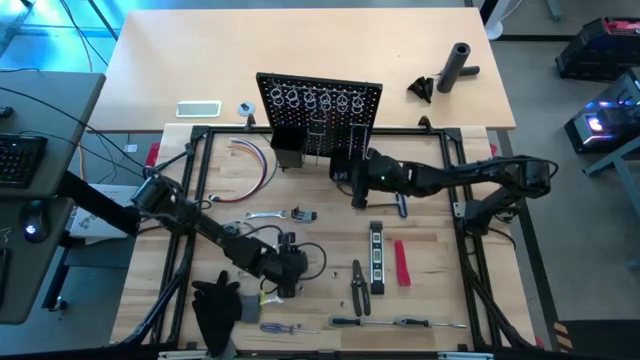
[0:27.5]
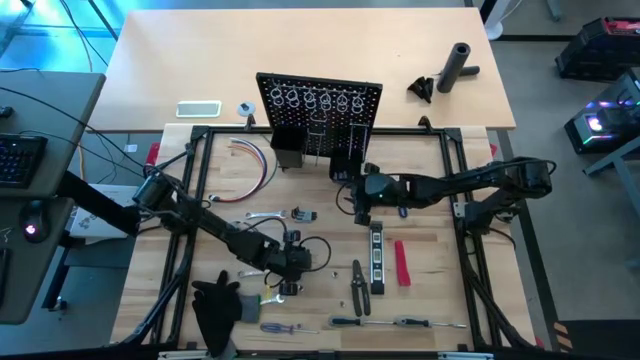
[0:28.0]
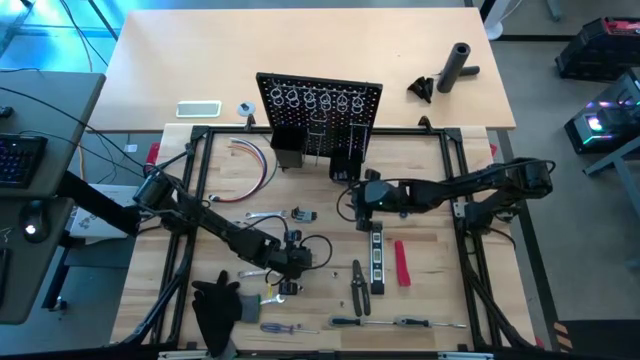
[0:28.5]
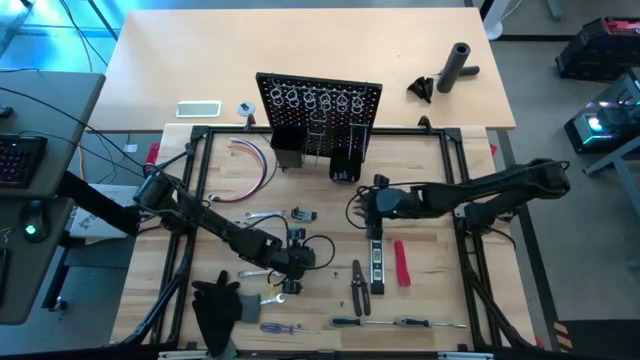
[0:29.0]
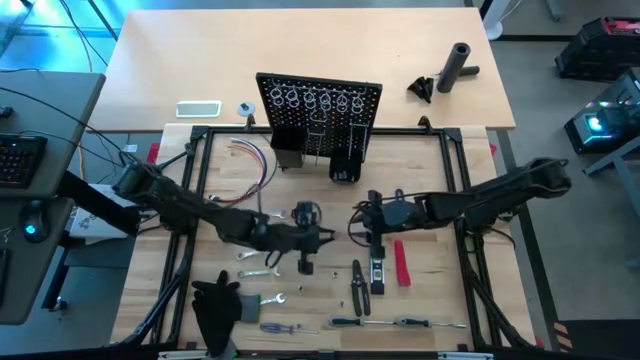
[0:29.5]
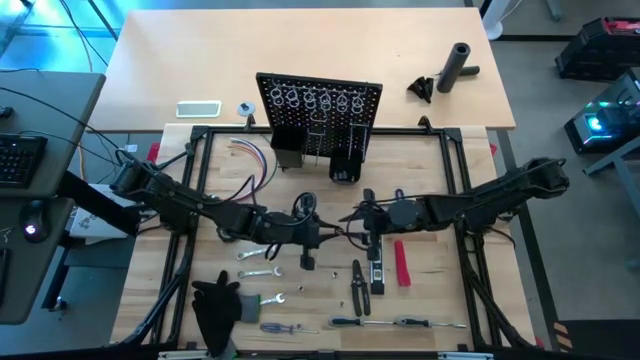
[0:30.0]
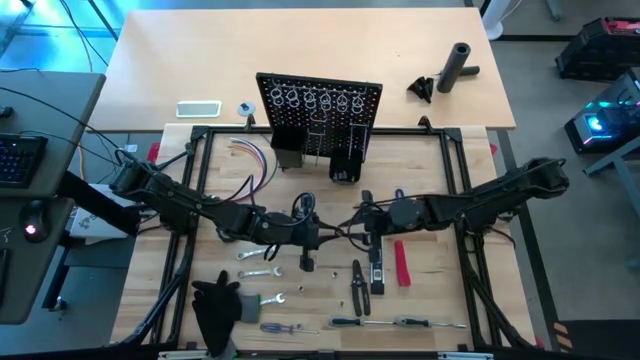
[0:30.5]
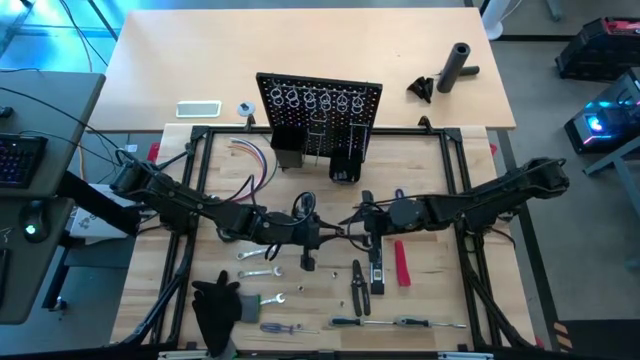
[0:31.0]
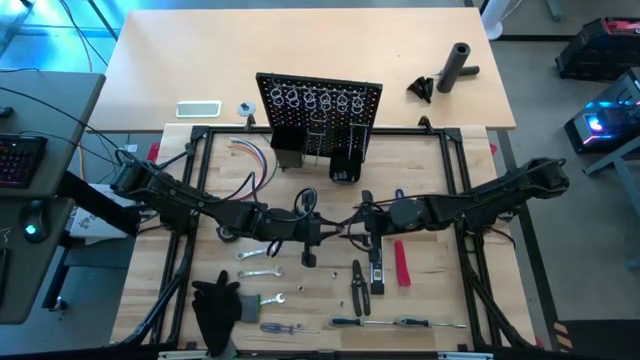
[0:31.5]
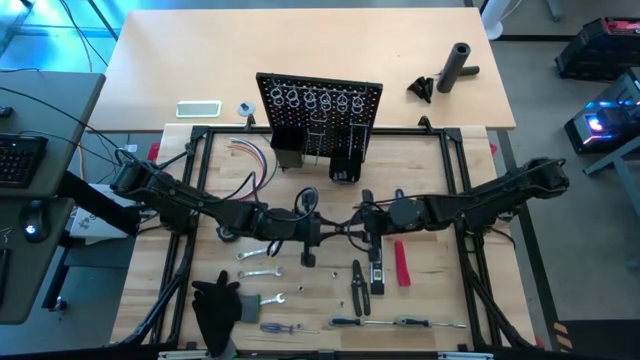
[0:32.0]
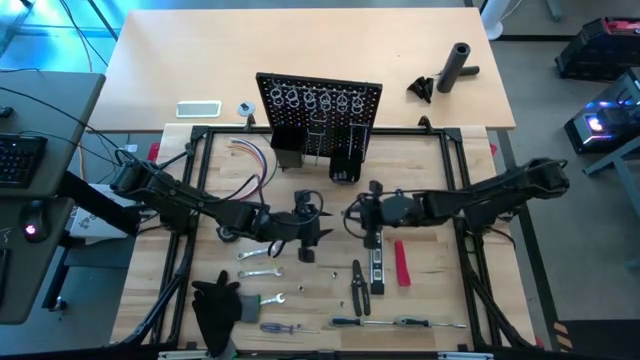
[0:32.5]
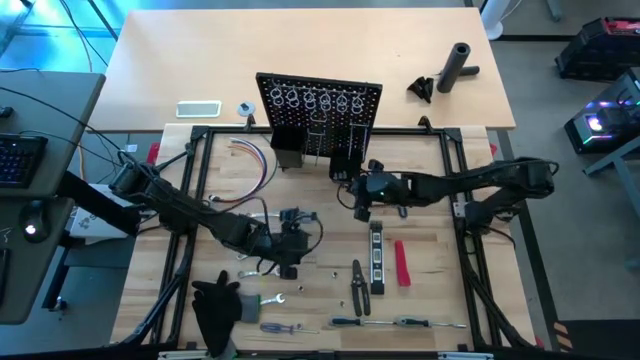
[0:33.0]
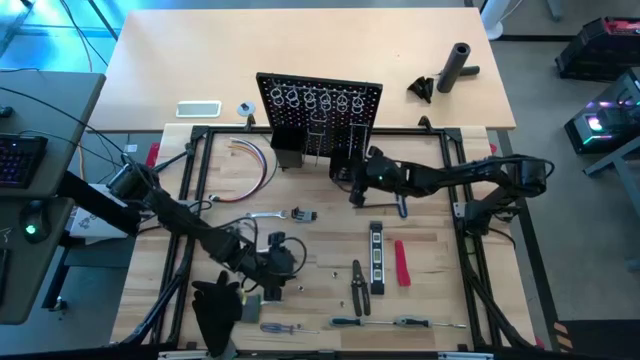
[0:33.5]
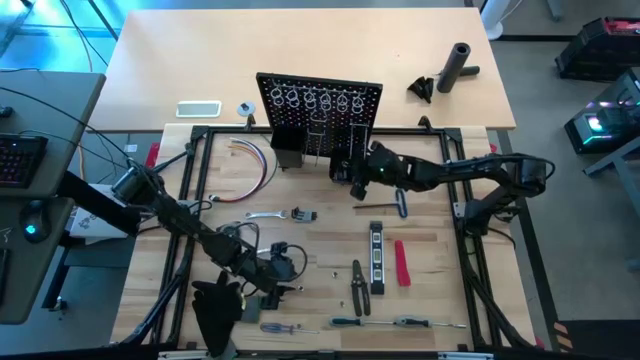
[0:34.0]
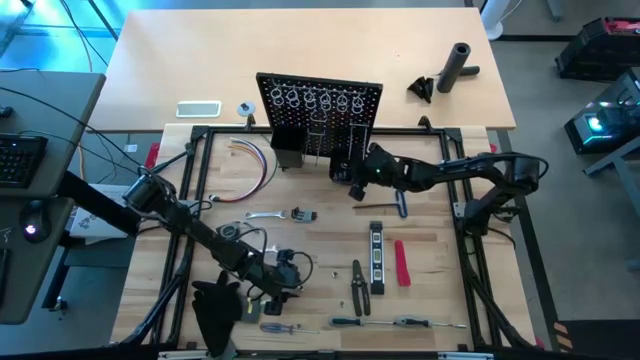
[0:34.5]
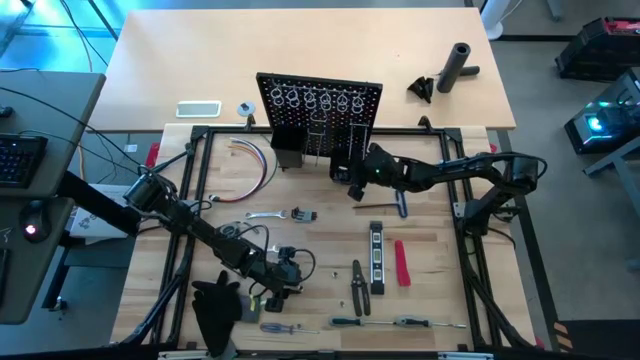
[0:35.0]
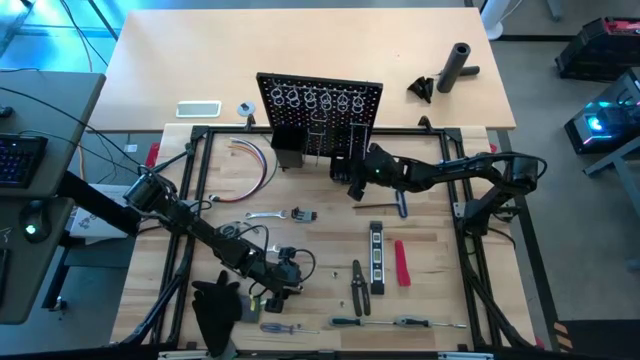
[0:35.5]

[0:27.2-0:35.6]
Task: Hang tools onto peg board
Put the socket into the small black bin on the black pegboard

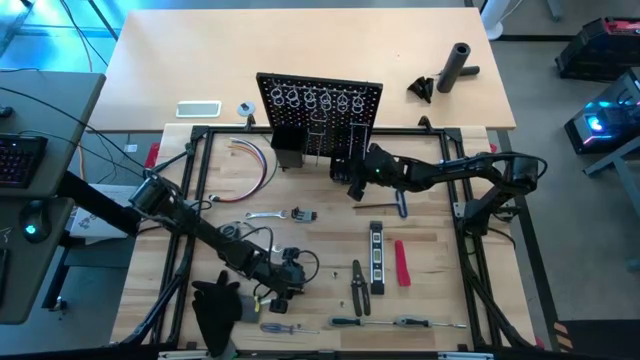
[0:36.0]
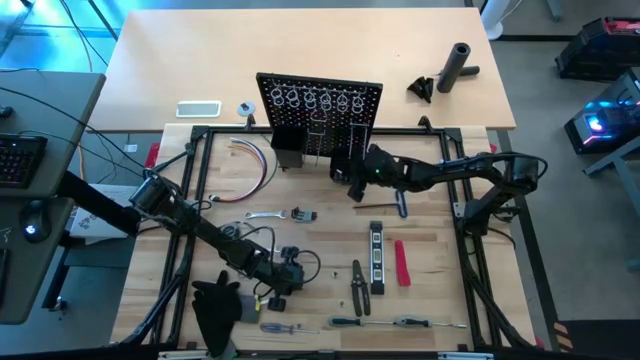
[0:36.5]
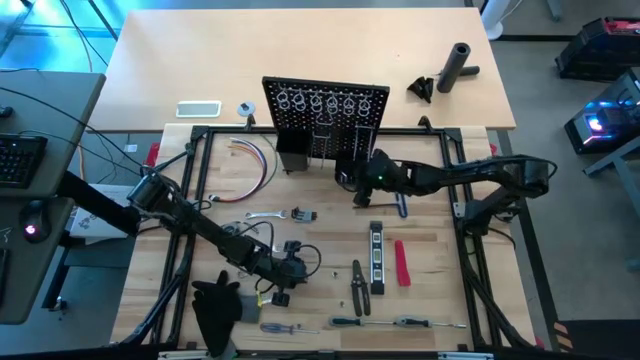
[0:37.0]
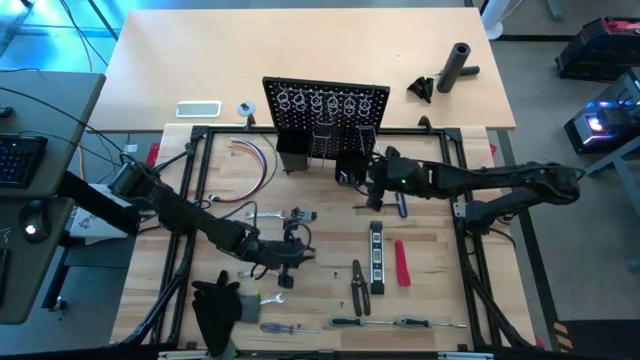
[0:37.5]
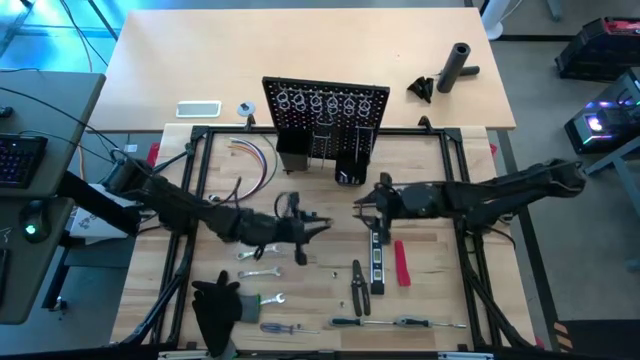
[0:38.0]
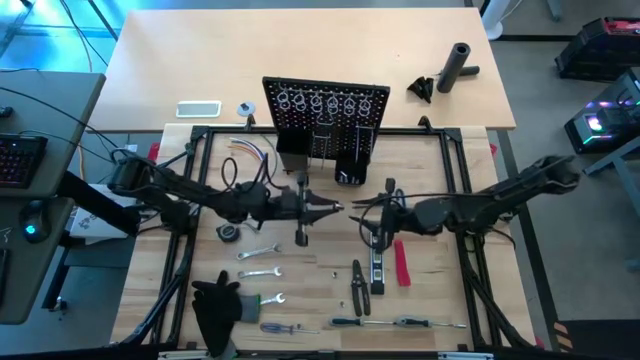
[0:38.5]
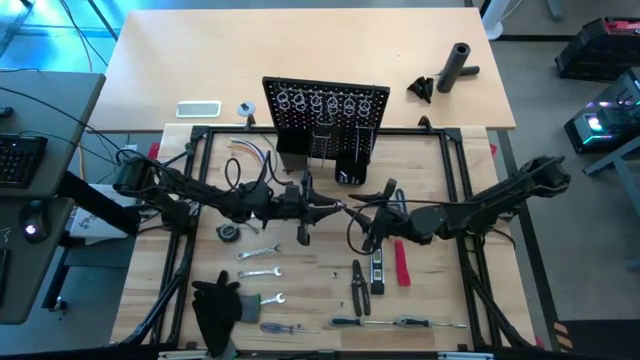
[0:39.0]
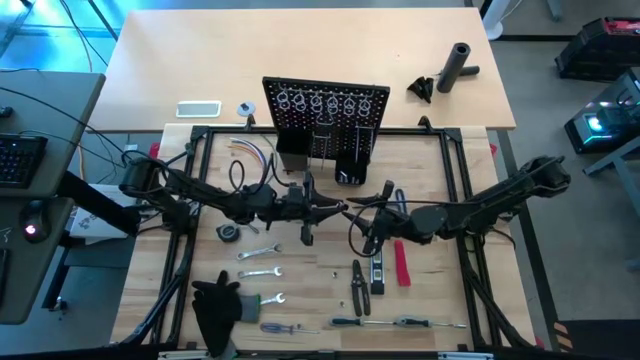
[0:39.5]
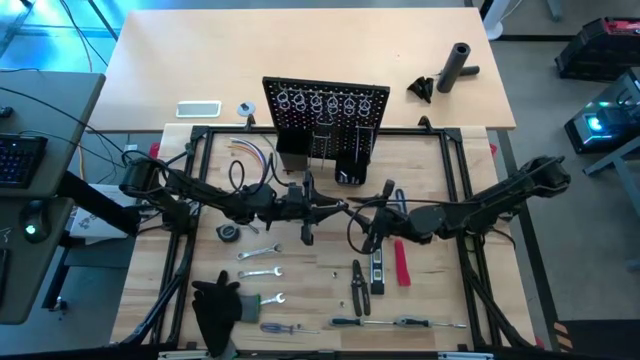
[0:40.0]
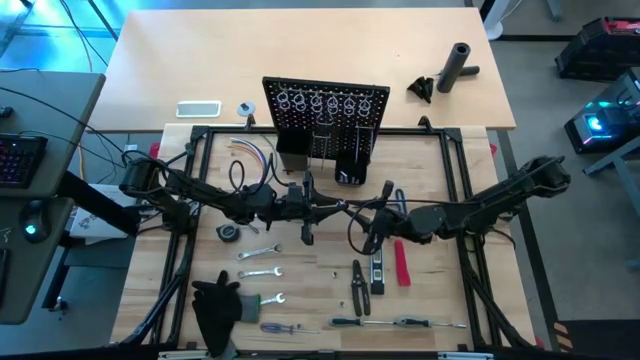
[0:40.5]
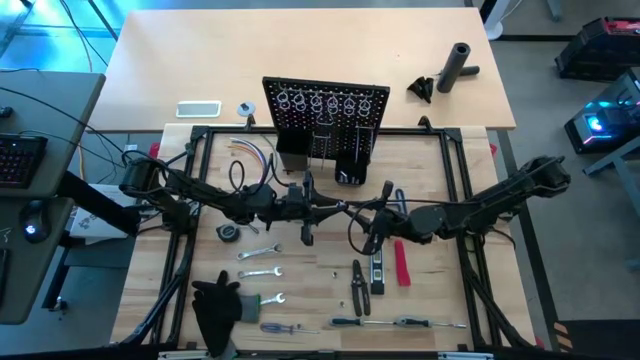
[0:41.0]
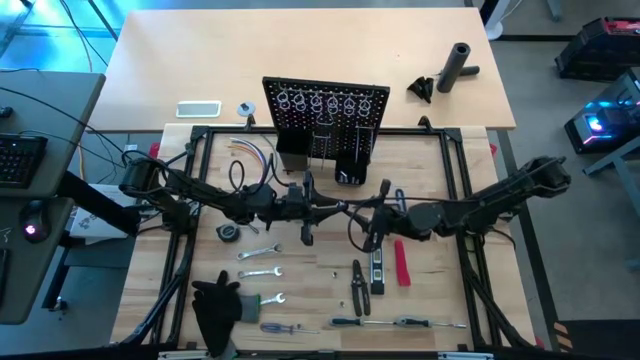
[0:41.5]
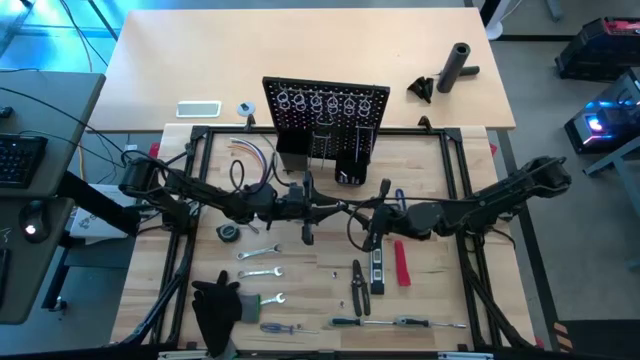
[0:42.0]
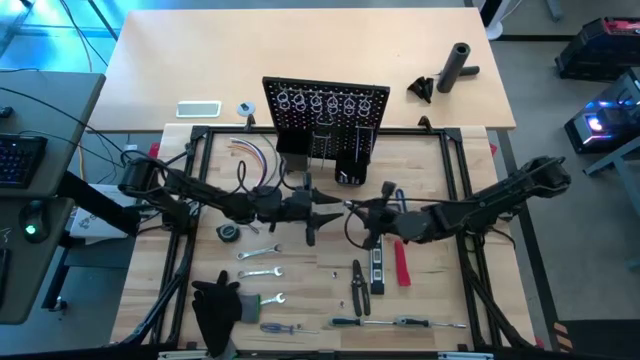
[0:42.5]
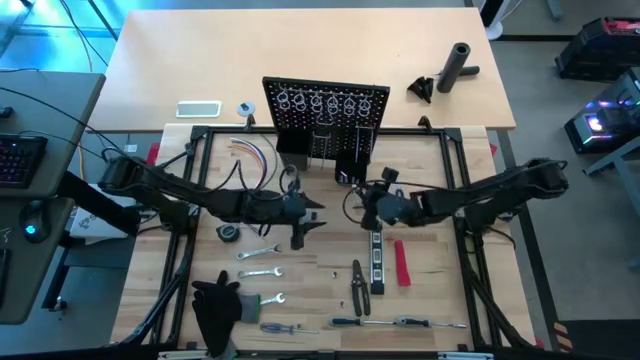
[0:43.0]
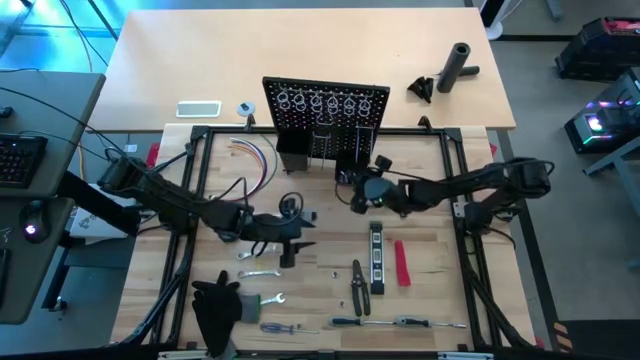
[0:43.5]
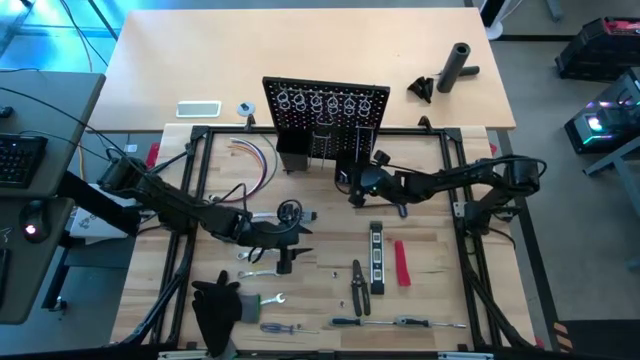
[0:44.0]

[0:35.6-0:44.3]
Put the socket into the small black bin on the black pegboard

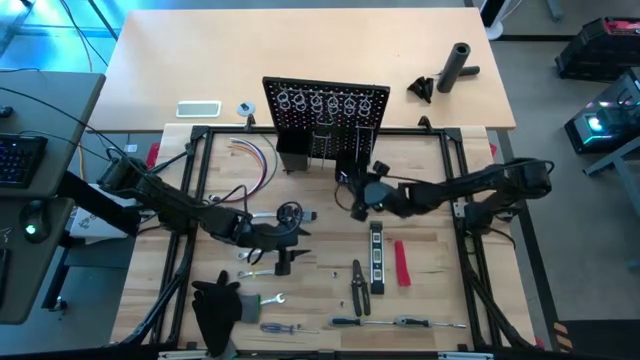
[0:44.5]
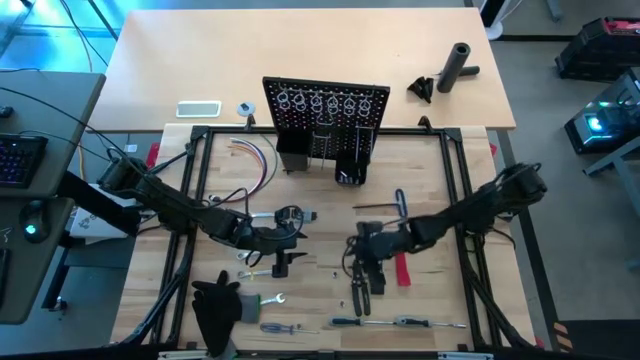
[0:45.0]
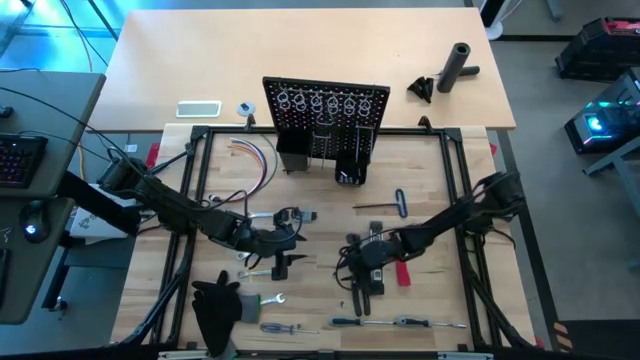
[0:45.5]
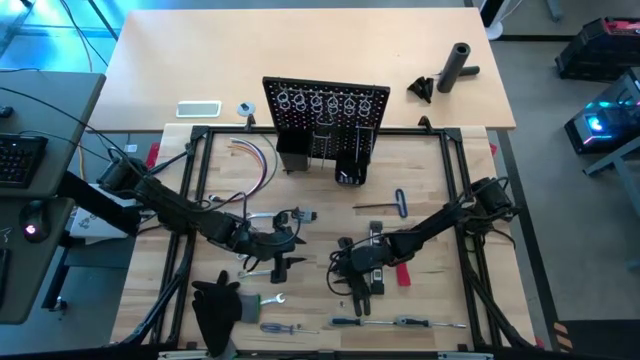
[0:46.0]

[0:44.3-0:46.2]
Put the socket into the small black bin on the black pegboard

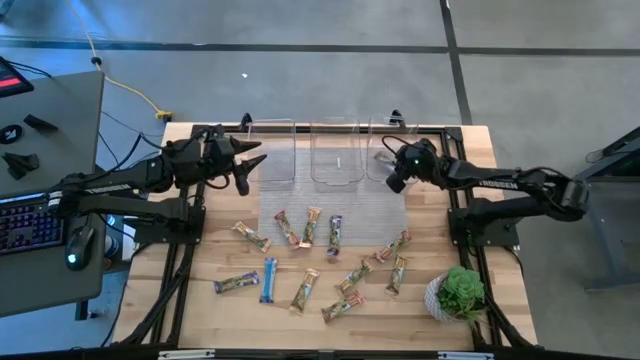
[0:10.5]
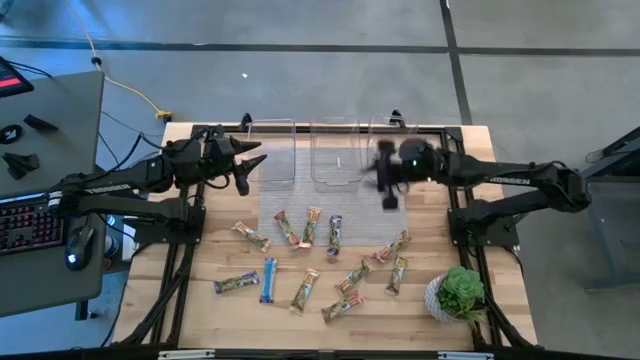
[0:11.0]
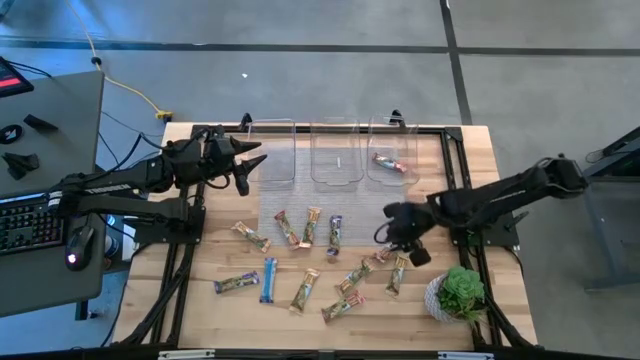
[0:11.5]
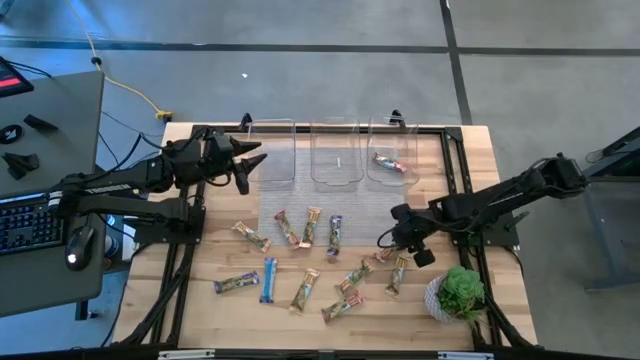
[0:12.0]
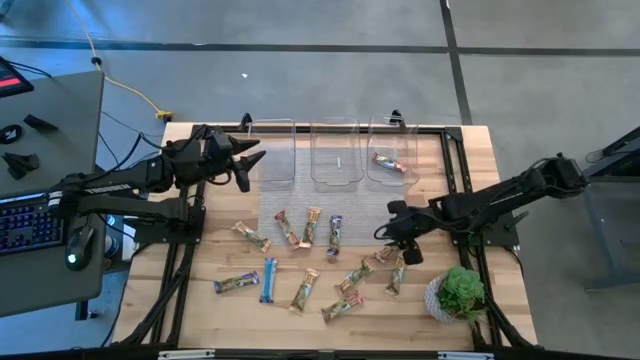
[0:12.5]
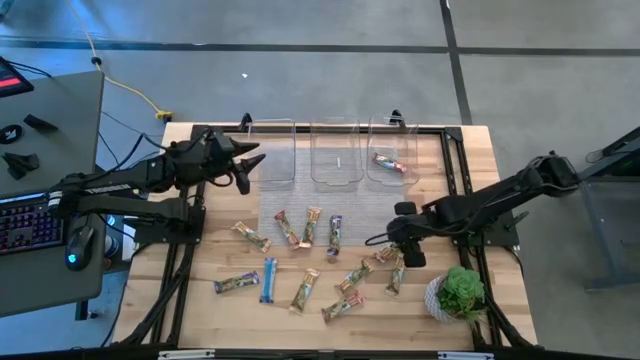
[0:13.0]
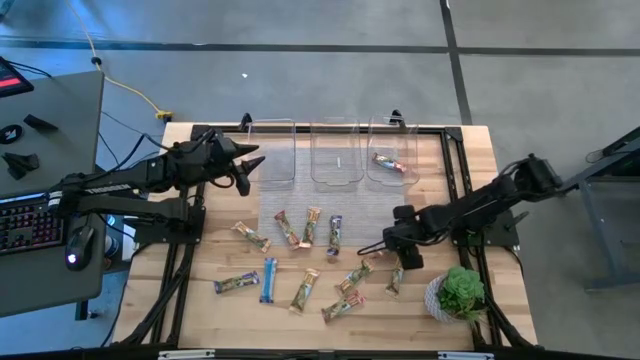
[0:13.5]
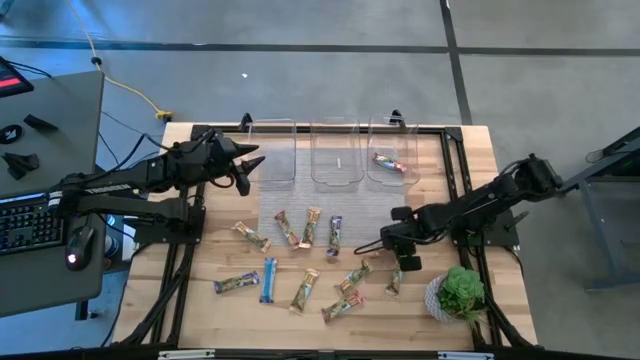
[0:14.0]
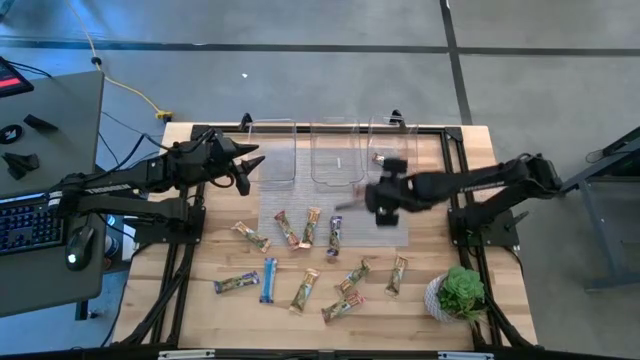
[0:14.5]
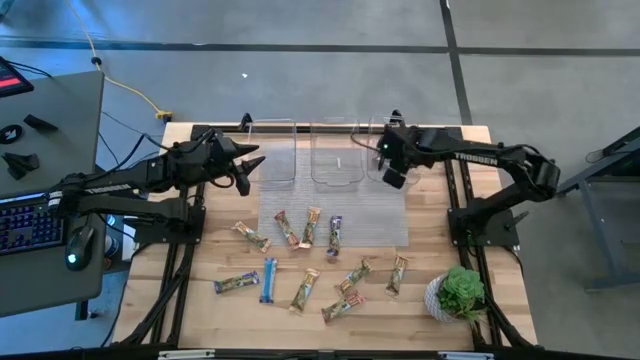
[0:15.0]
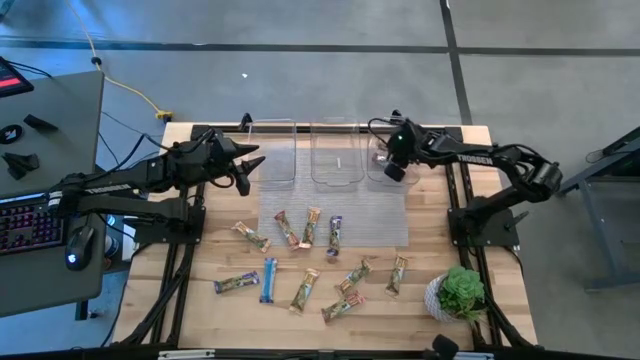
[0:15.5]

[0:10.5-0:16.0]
Task: Pick and place Granola Bars by type
Put the red granola bar into the right transparent bin
